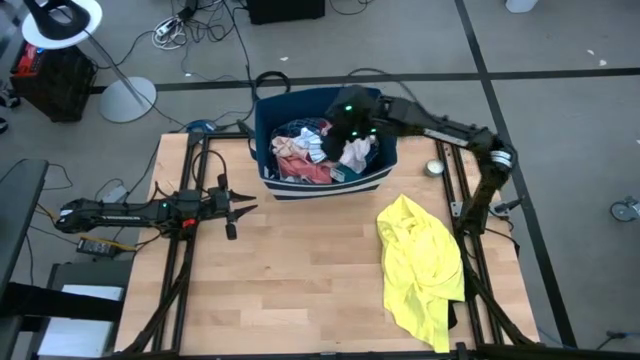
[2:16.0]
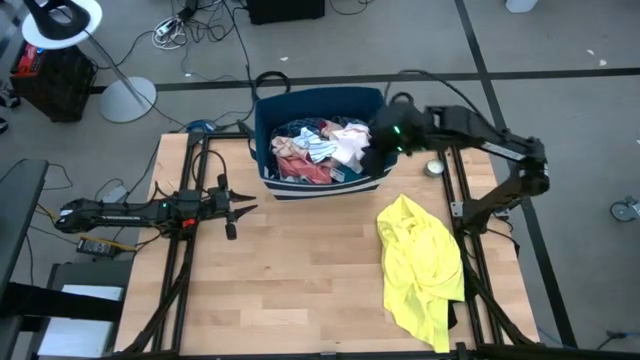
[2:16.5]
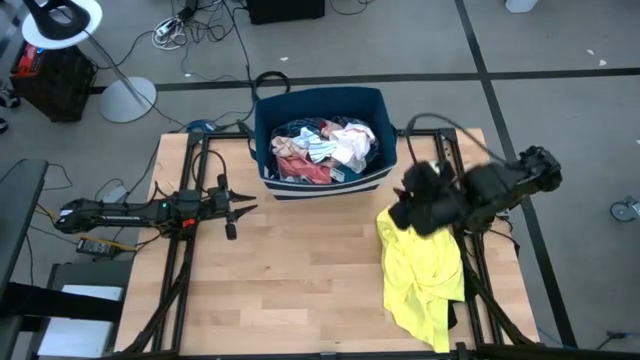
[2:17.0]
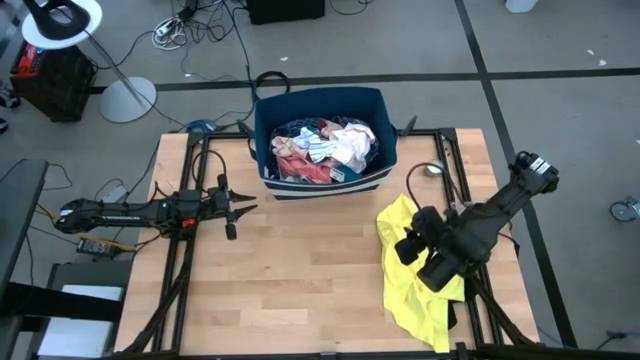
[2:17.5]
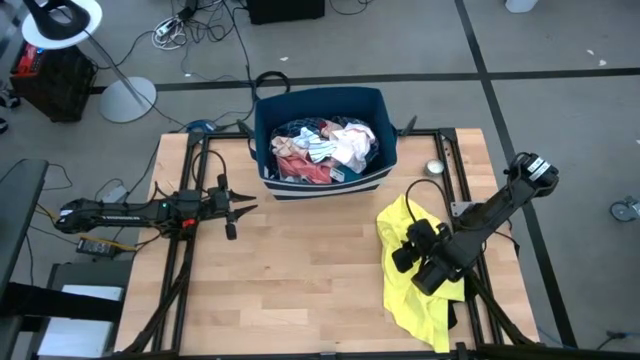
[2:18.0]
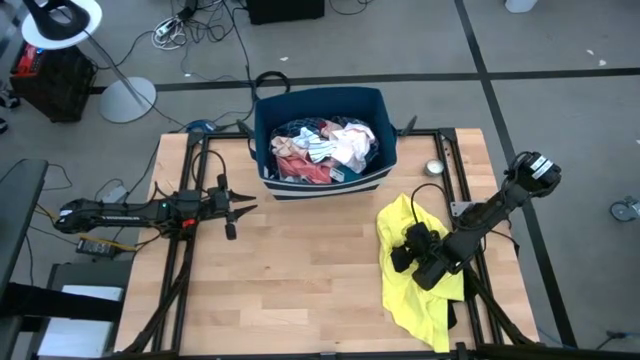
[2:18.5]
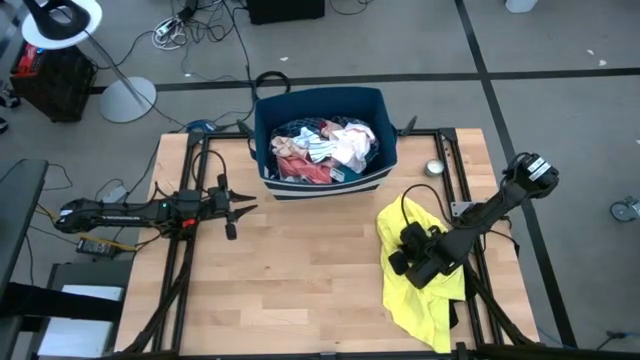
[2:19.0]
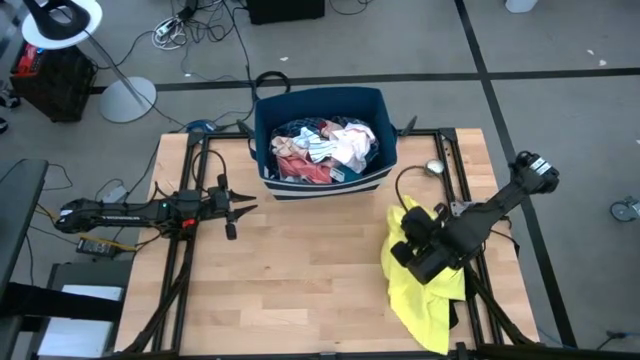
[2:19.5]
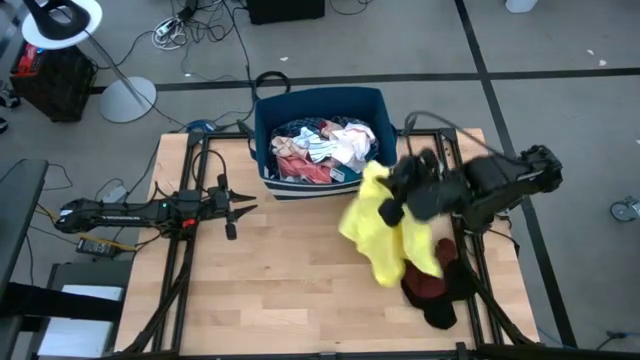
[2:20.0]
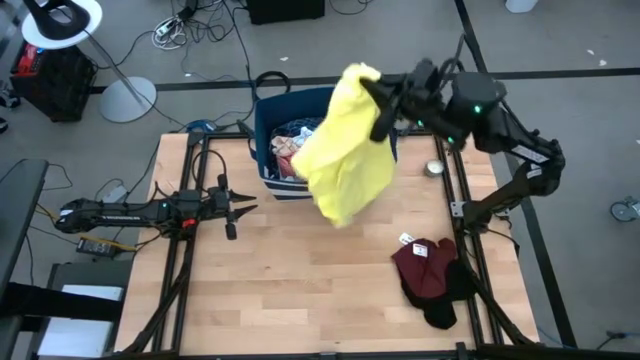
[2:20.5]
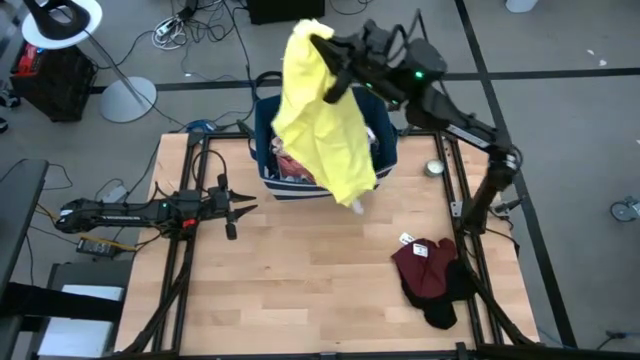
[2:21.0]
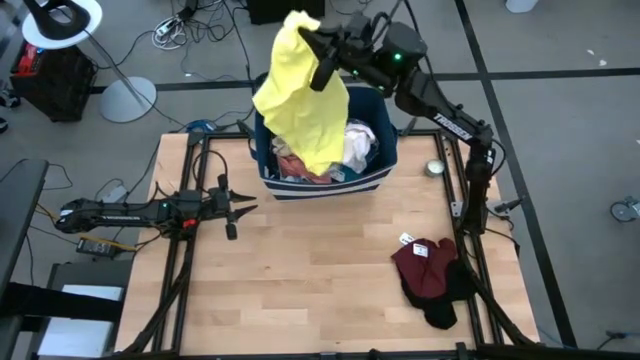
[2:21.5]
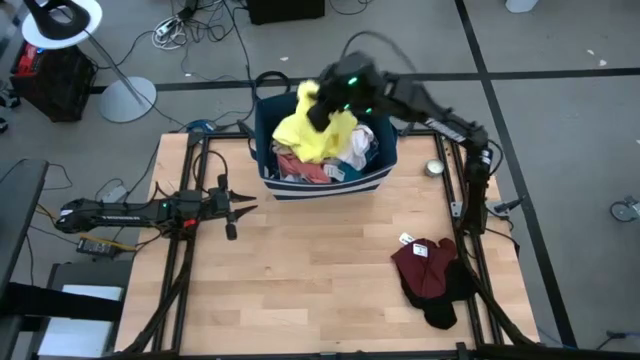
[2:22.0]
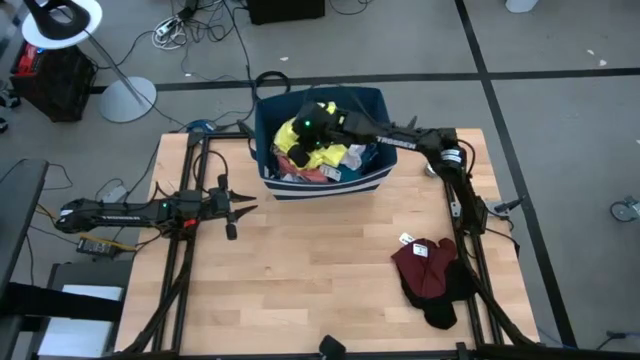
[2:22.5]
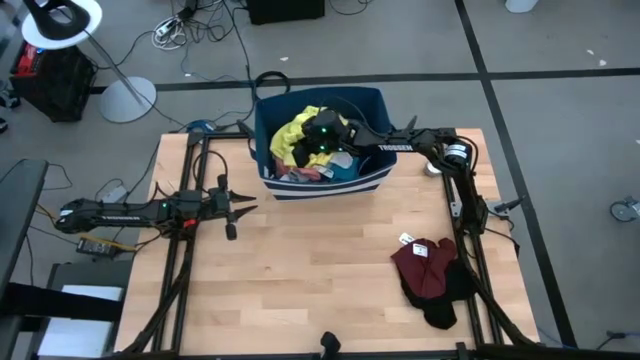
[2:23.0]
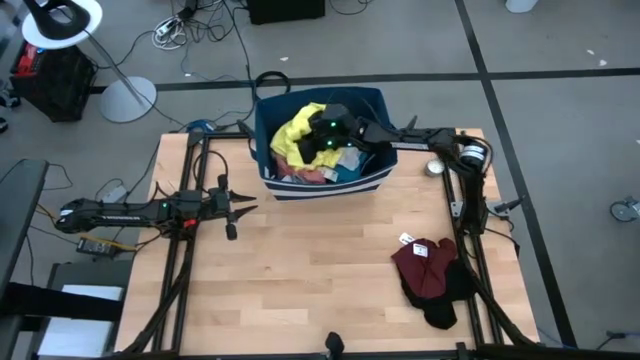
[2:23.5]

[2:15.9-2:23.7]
Task: Sort clothes
Put the yellow shirt into the blue bin

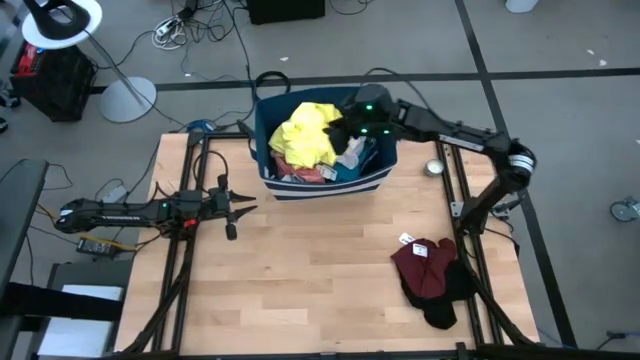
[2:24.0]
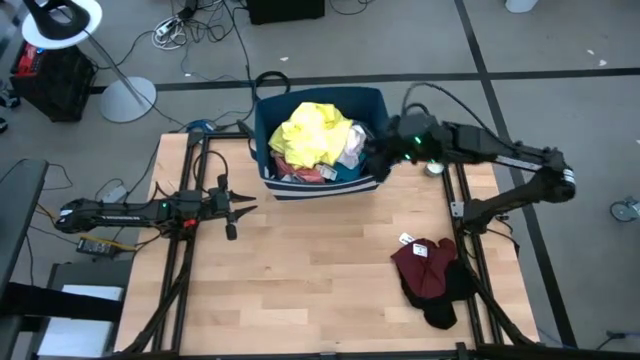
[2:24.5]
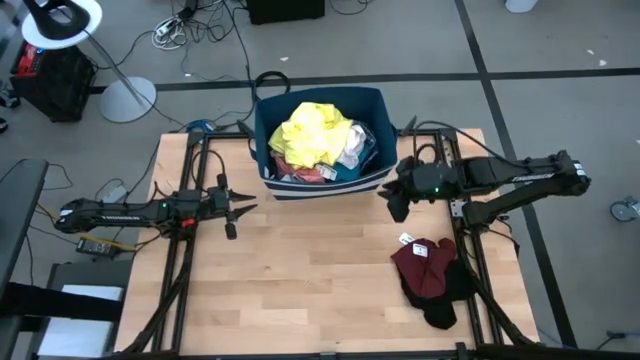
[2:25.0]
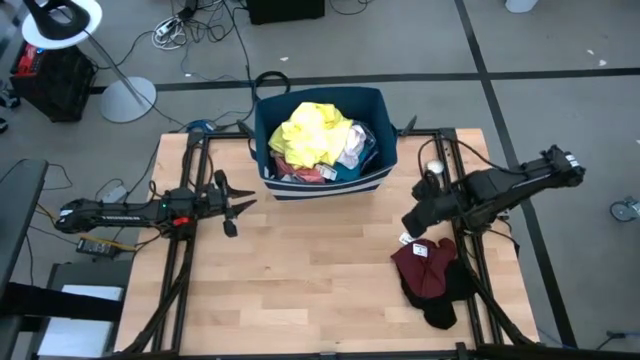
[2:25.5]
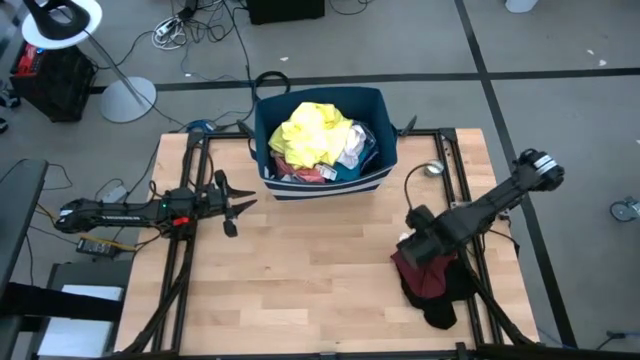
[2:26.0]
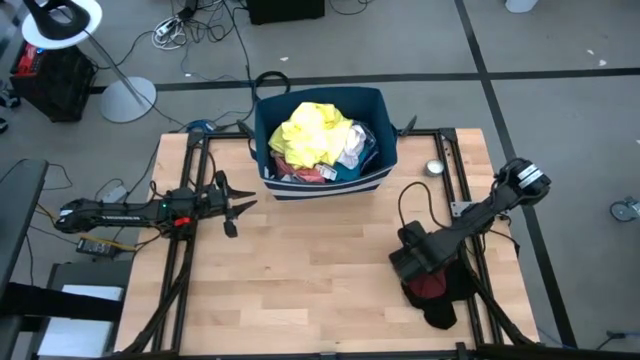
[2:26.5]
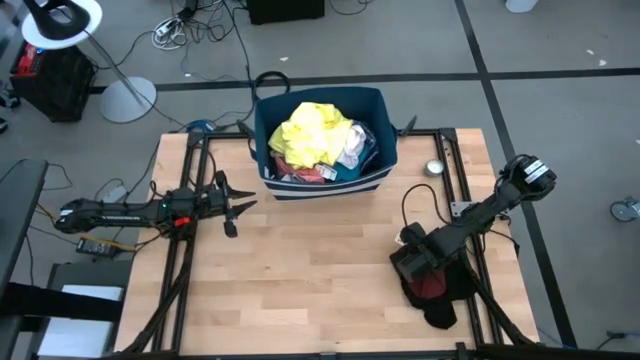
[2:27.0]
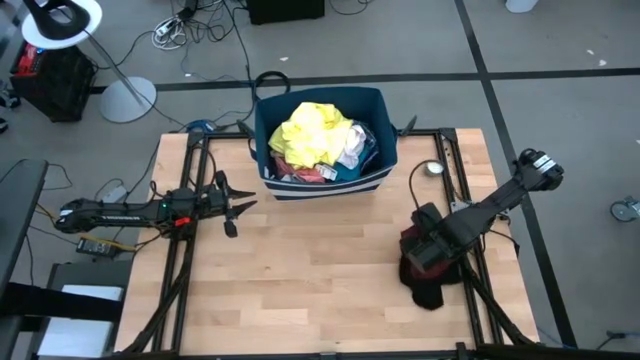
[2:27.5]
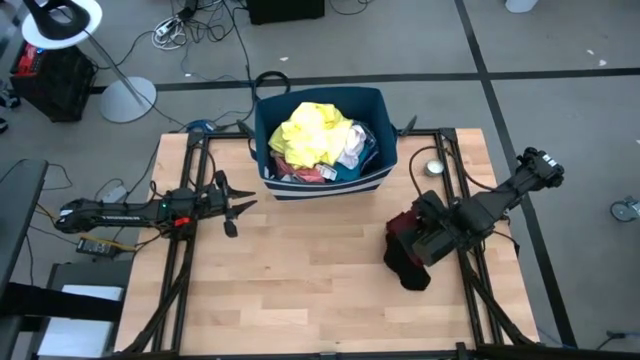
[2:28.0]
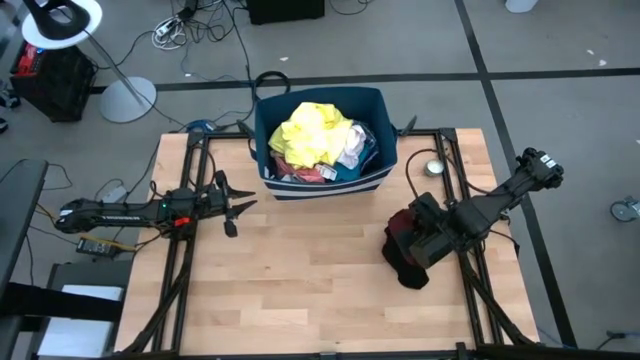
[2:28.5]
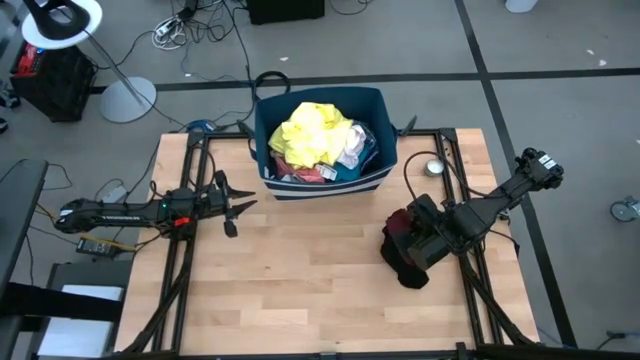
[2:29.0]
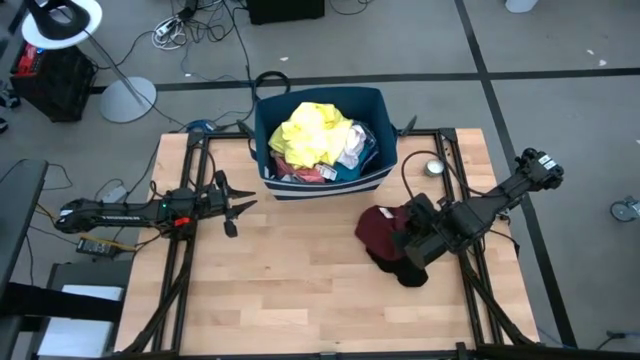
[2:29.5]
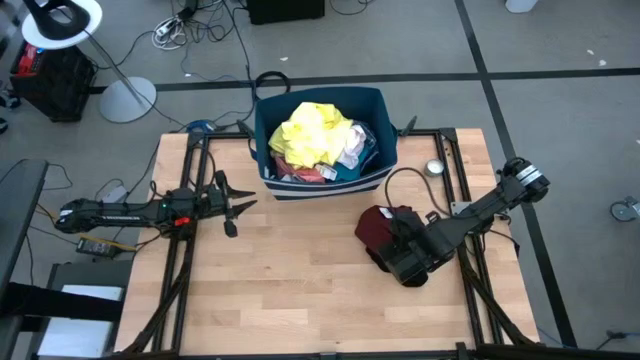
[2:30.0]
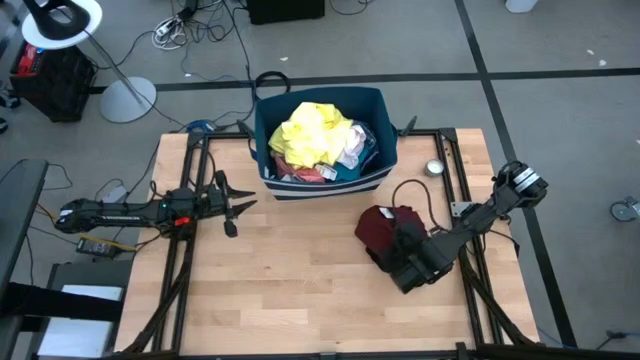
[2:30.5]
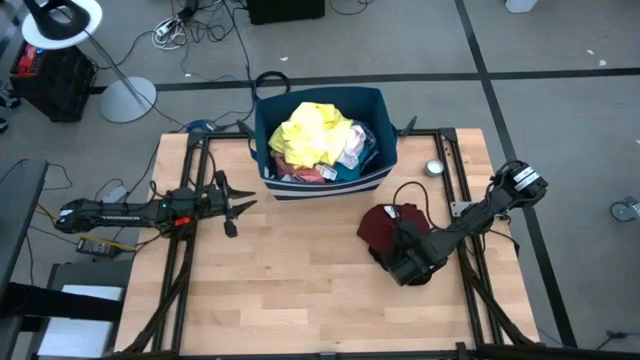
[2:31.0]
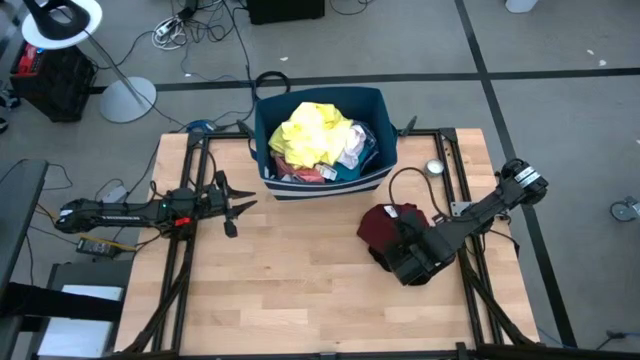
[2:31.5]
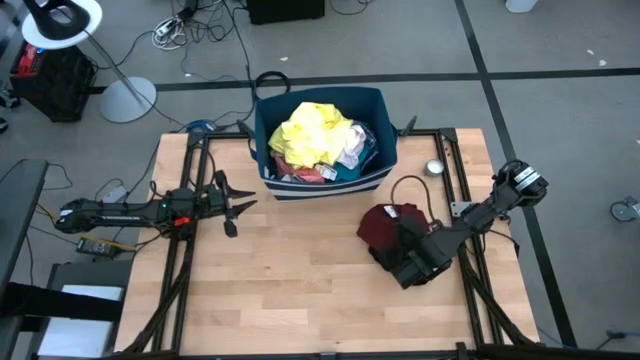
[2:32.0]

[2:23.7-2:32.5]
Put the maroon underwear into the blue bin

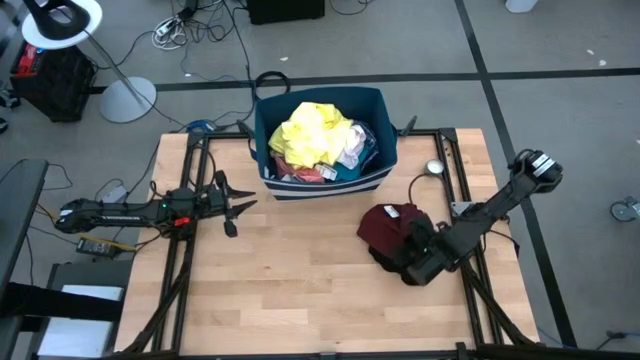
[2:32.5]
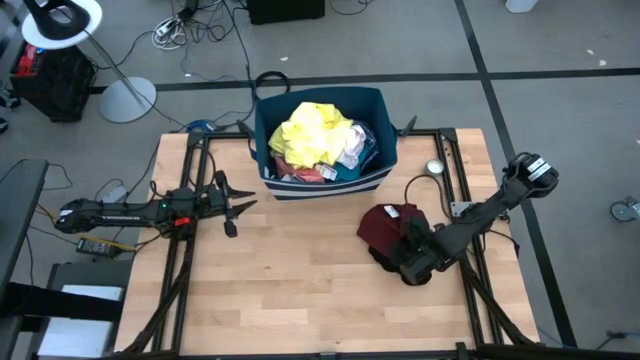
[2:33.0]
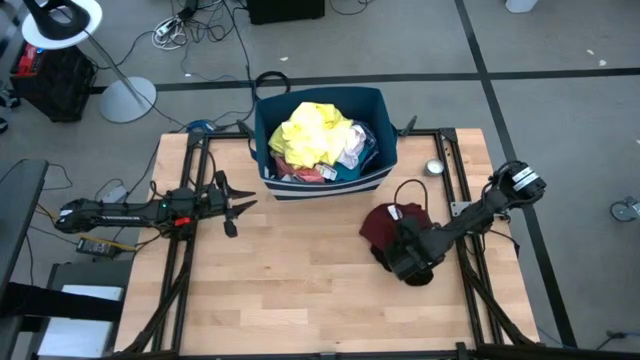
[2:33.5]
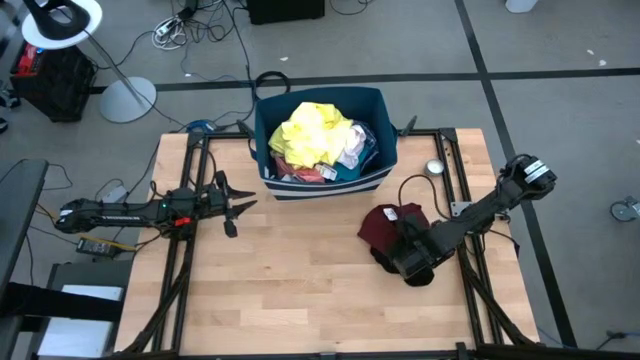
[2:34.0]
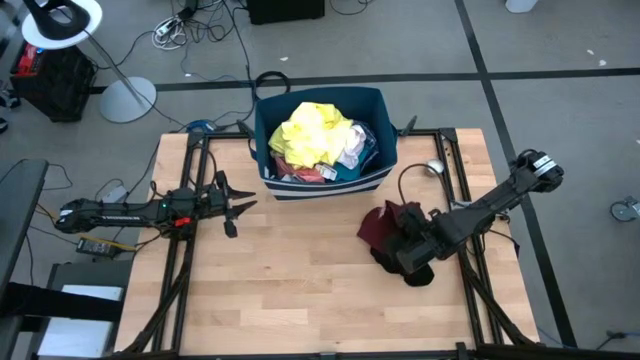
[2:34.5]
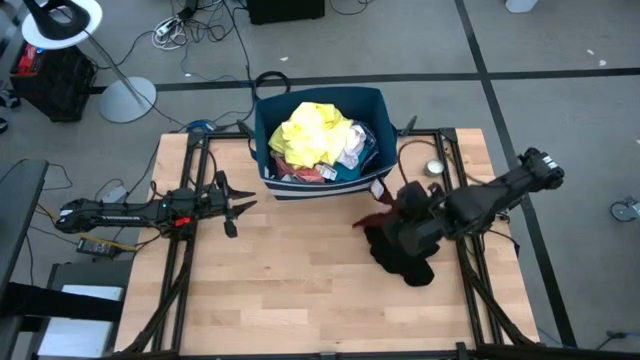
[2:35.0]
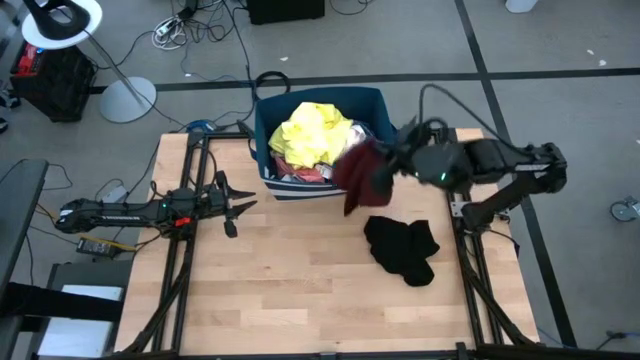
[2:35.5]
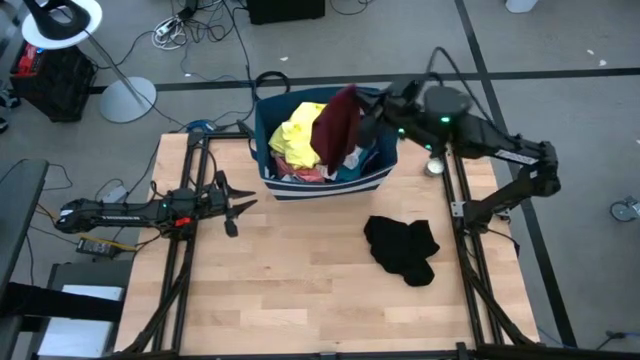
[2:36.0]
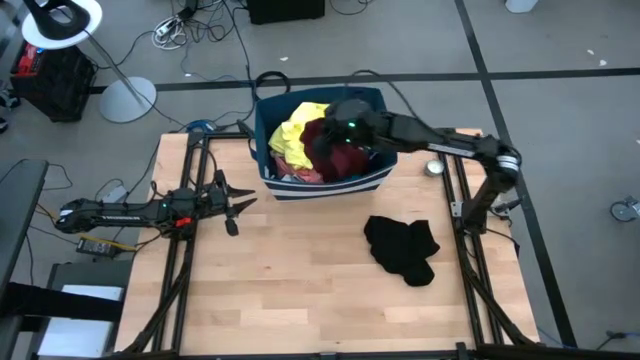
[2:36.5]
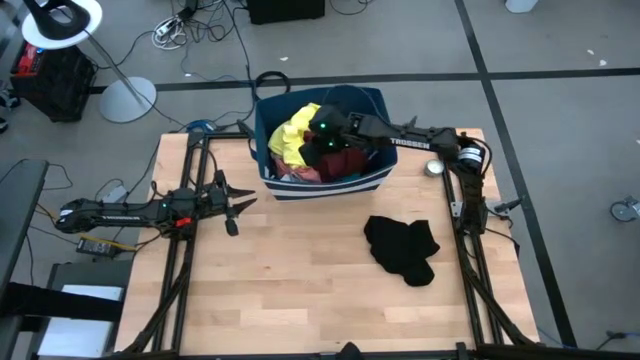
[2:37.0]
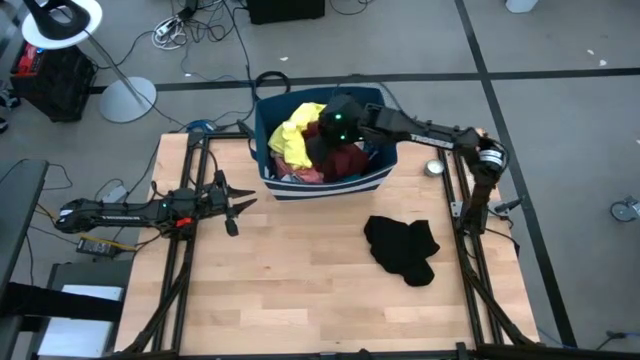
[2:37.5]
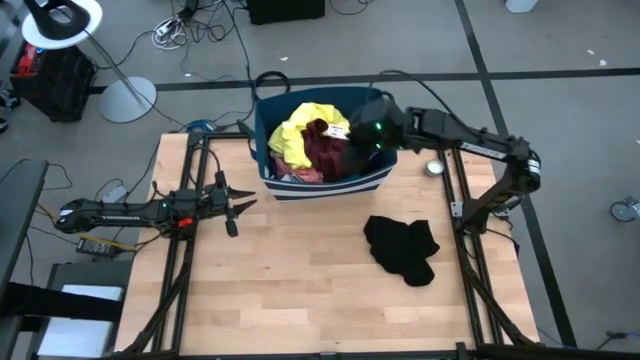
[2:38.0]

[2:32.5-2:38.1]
Put the maroon underwear into the blue bin
